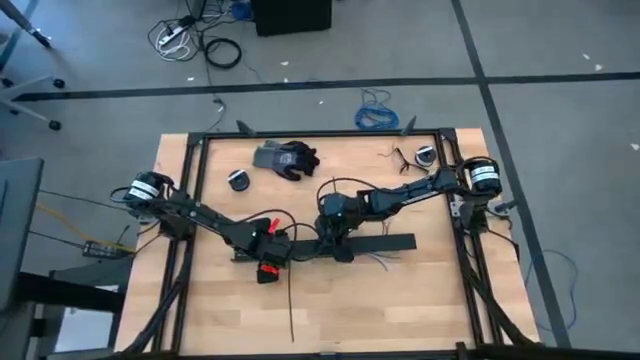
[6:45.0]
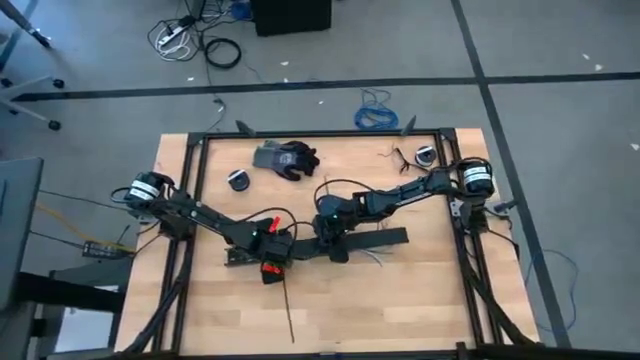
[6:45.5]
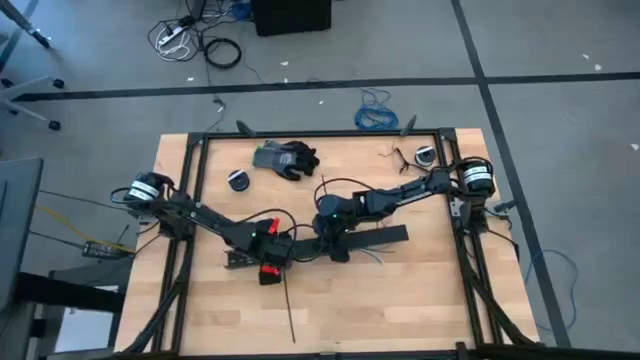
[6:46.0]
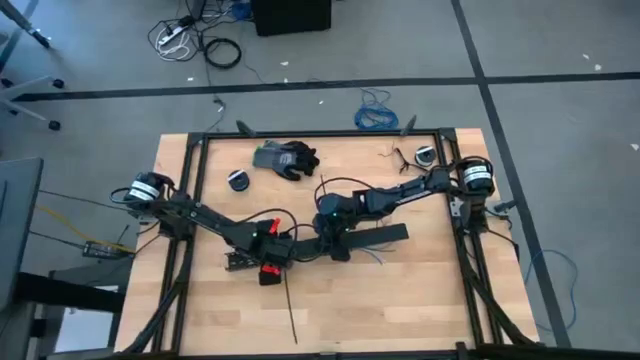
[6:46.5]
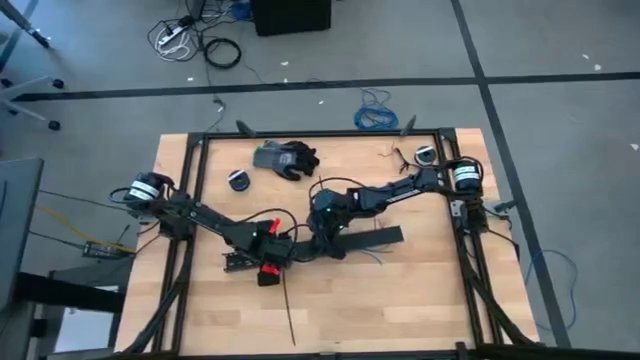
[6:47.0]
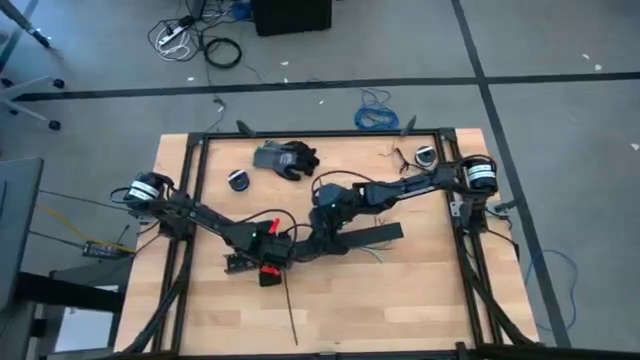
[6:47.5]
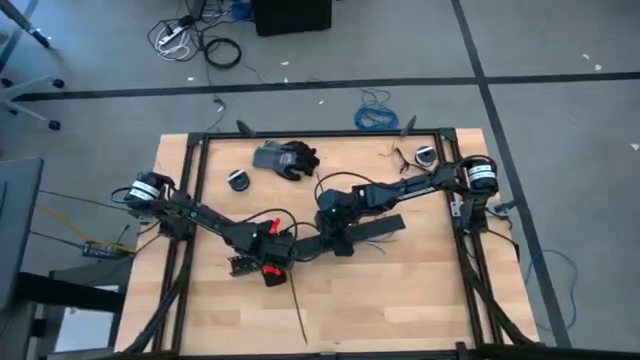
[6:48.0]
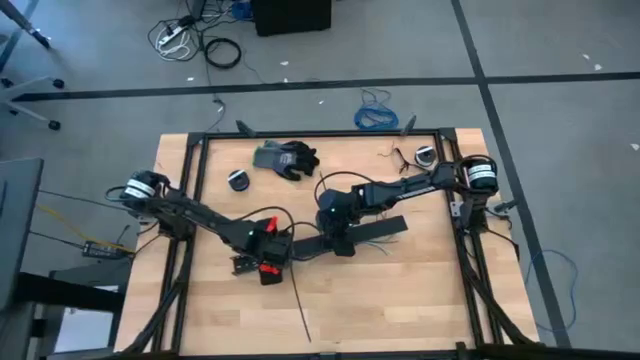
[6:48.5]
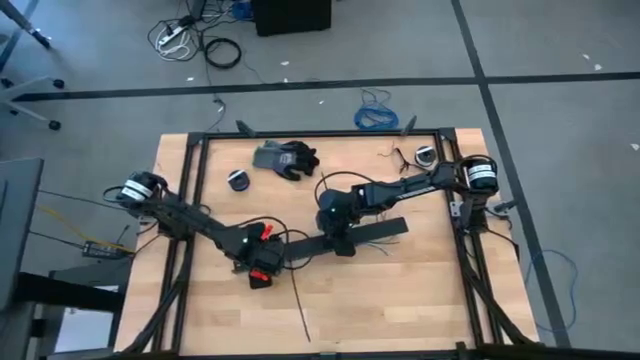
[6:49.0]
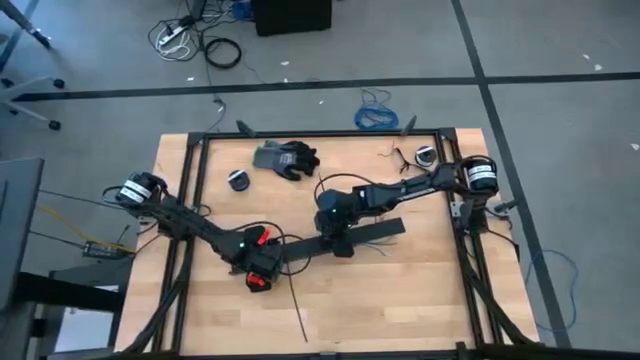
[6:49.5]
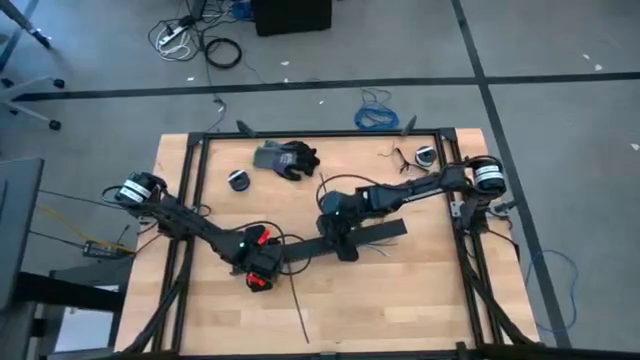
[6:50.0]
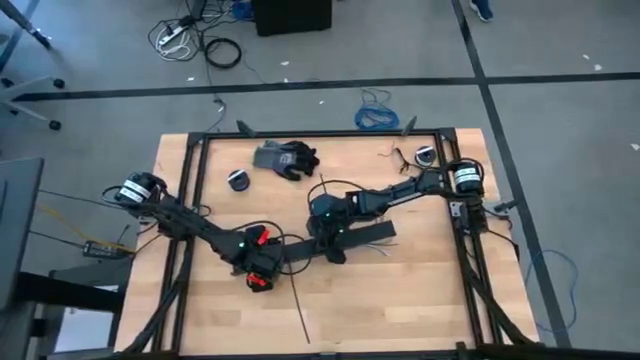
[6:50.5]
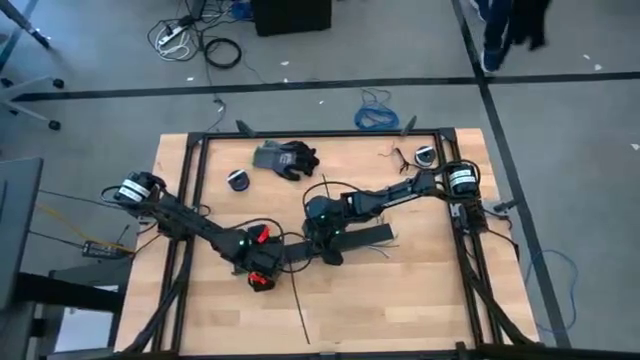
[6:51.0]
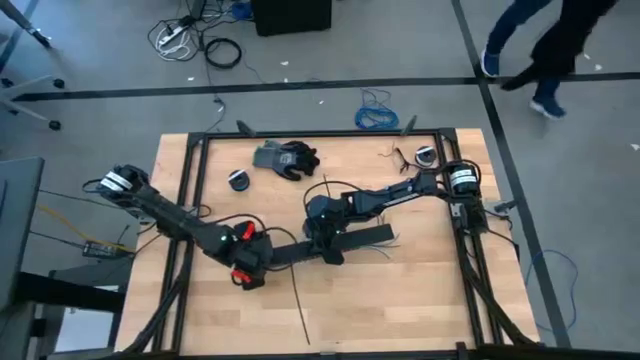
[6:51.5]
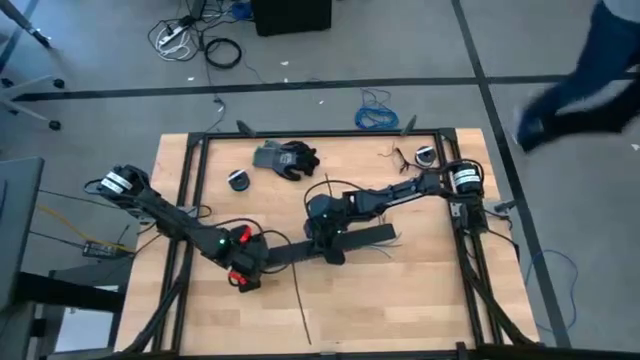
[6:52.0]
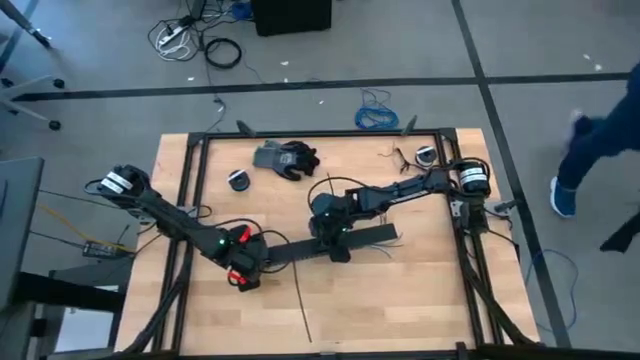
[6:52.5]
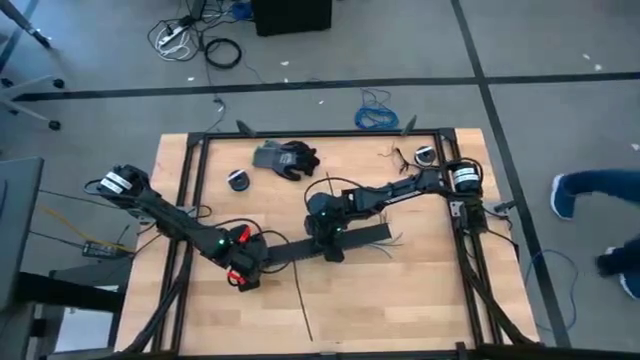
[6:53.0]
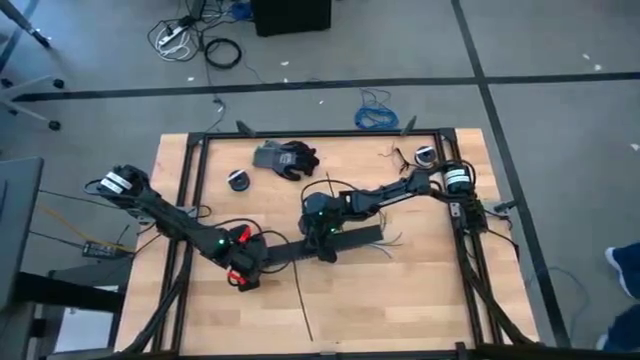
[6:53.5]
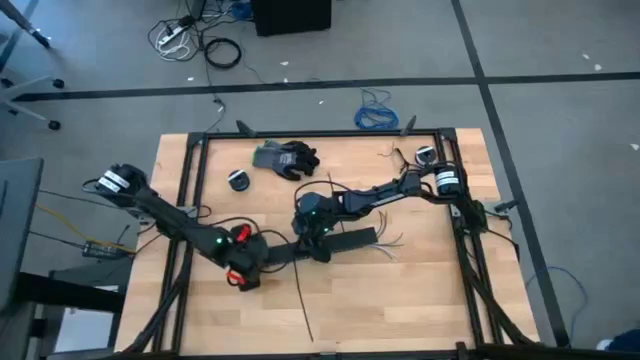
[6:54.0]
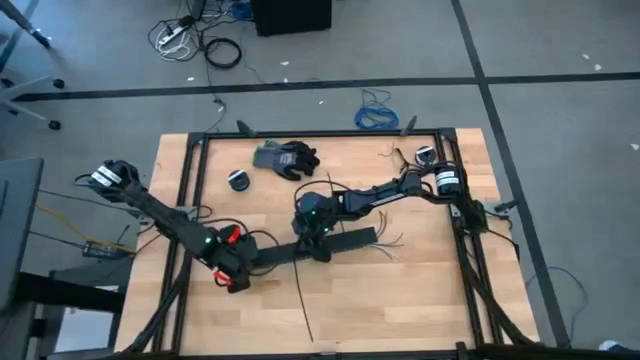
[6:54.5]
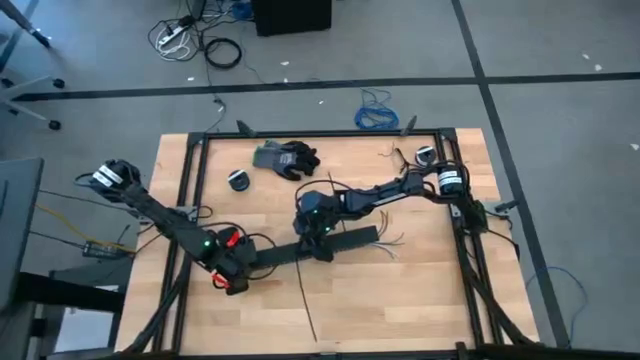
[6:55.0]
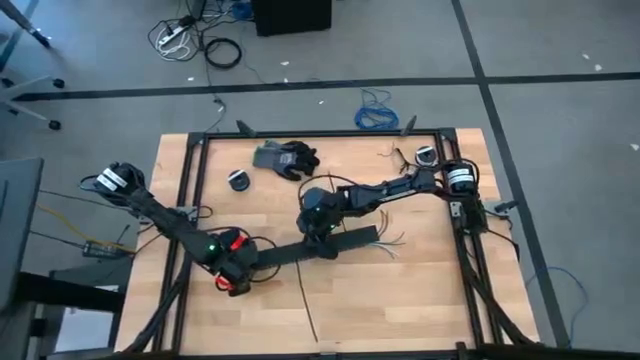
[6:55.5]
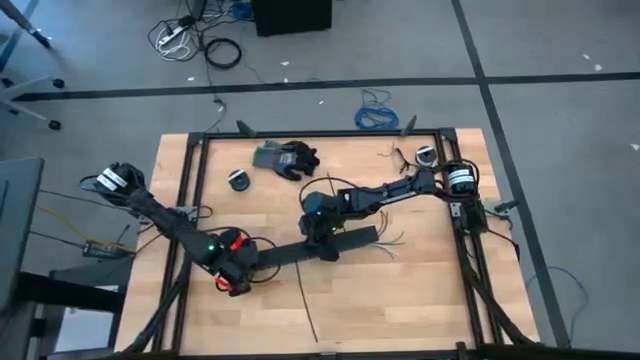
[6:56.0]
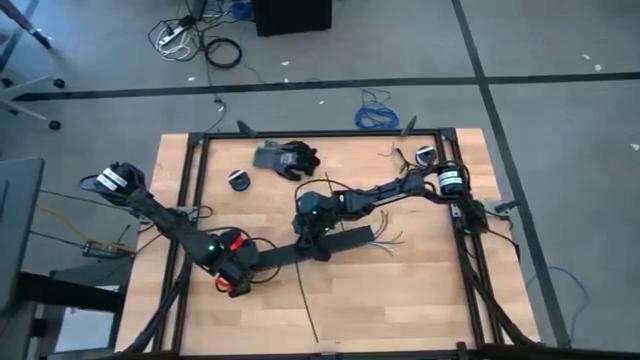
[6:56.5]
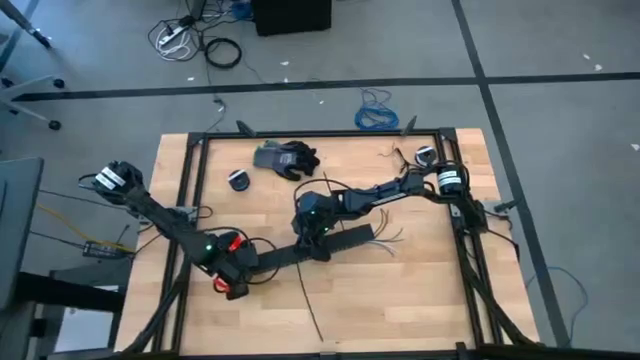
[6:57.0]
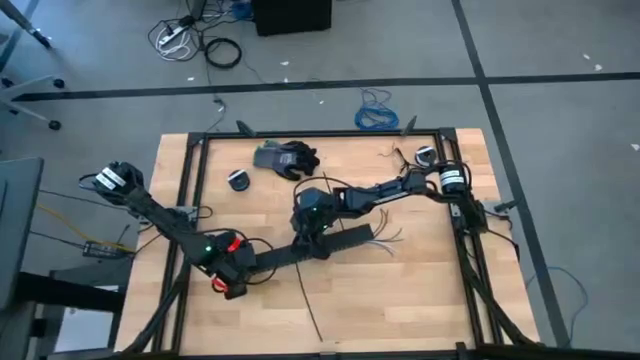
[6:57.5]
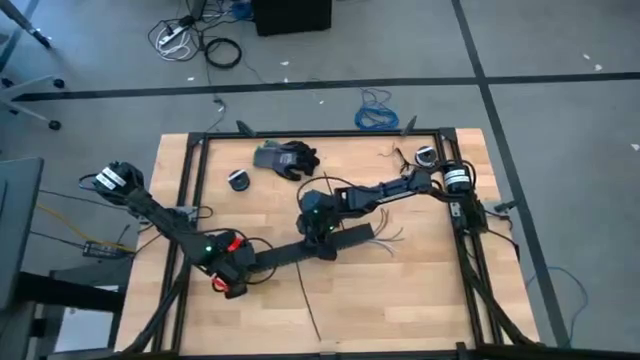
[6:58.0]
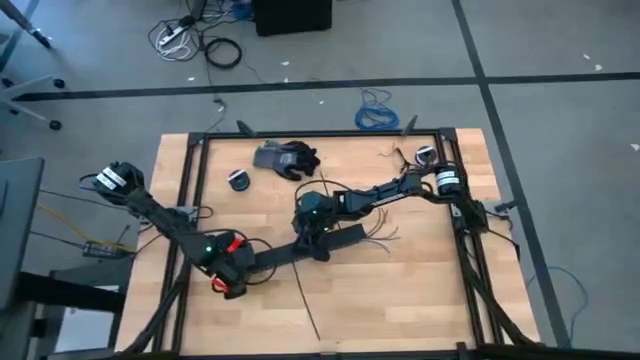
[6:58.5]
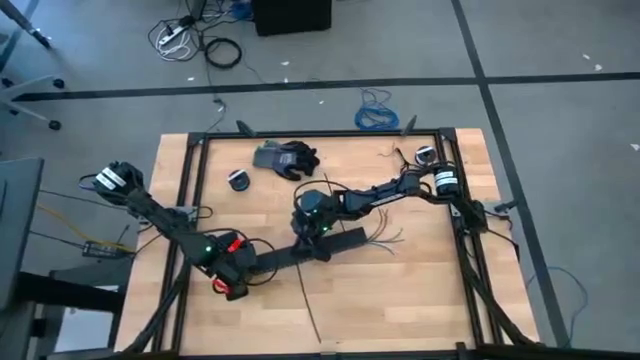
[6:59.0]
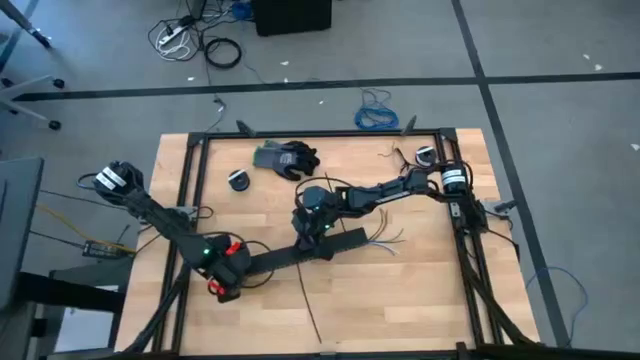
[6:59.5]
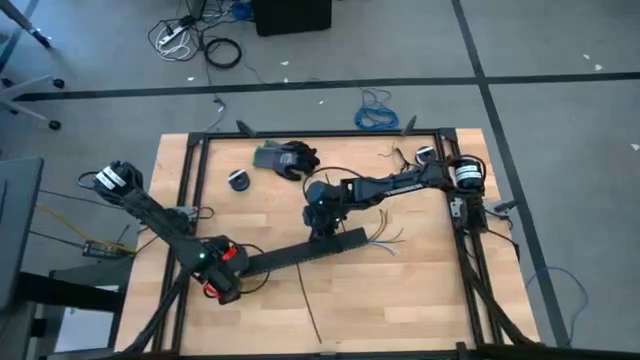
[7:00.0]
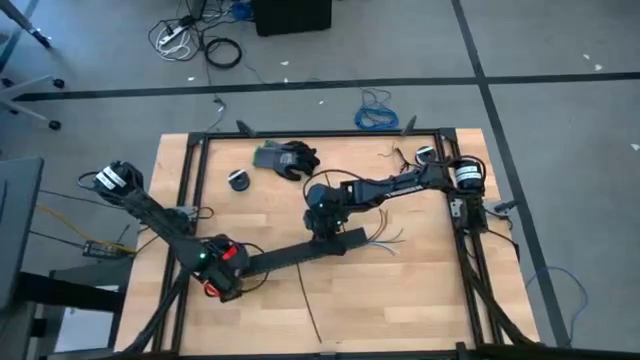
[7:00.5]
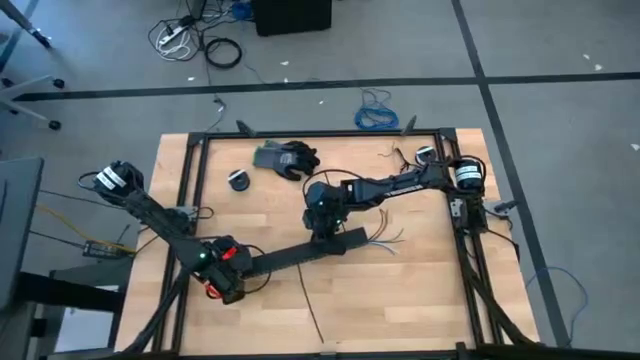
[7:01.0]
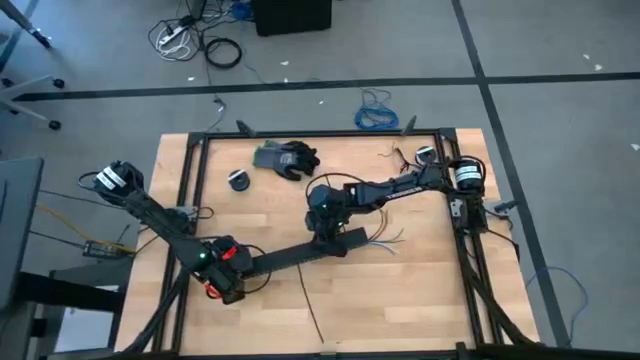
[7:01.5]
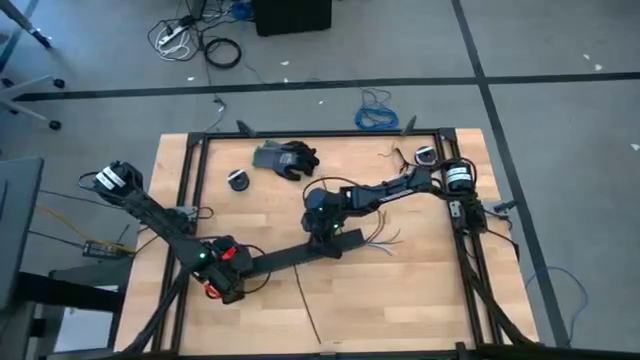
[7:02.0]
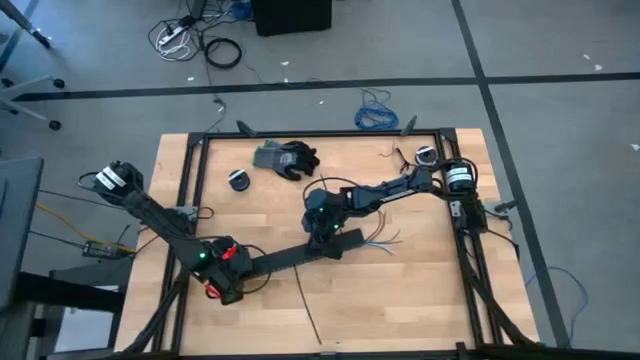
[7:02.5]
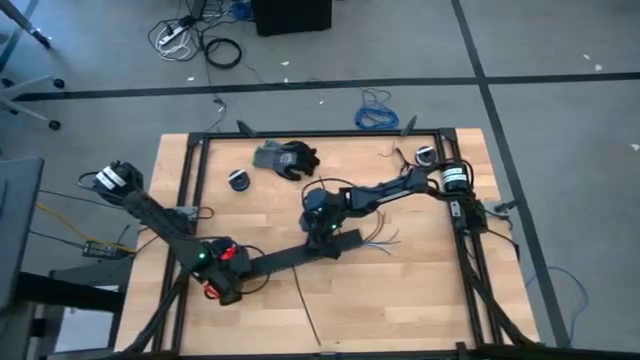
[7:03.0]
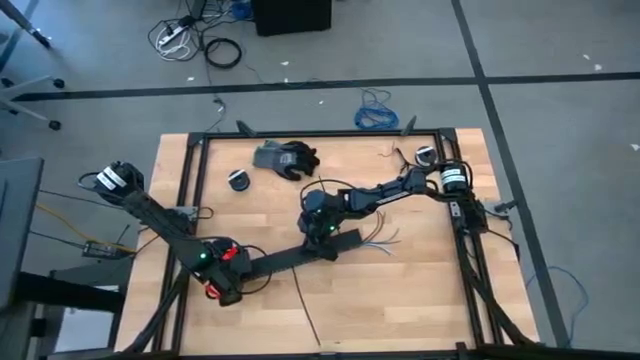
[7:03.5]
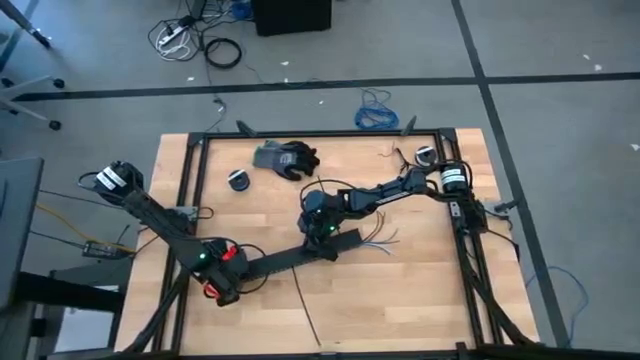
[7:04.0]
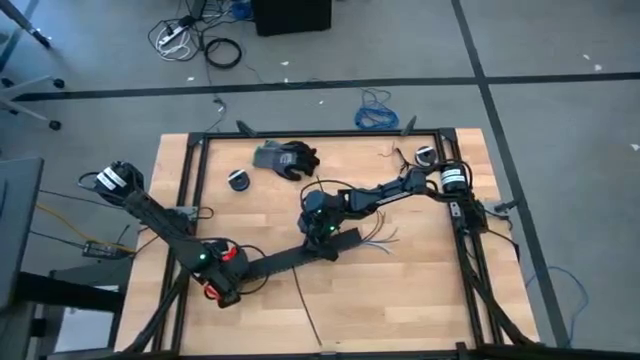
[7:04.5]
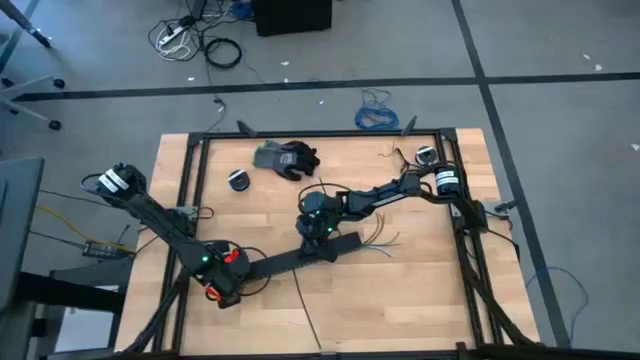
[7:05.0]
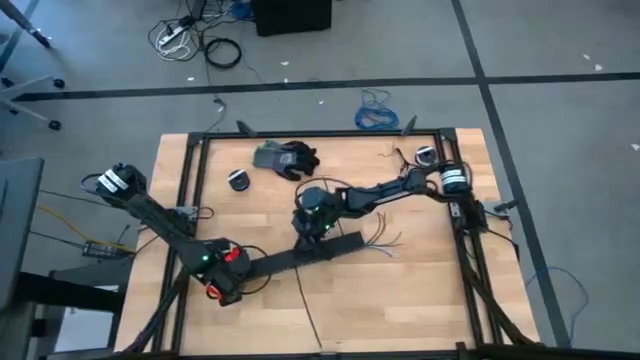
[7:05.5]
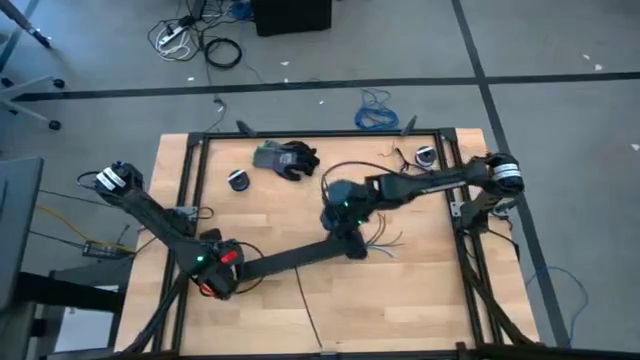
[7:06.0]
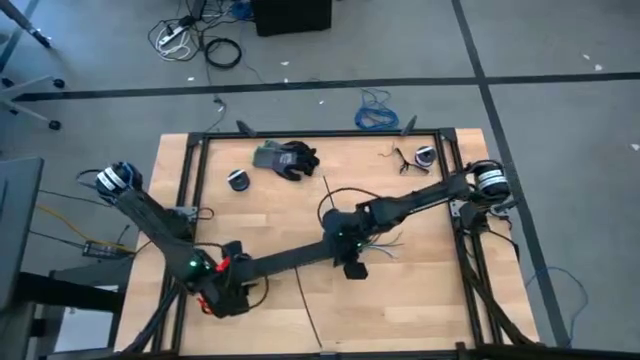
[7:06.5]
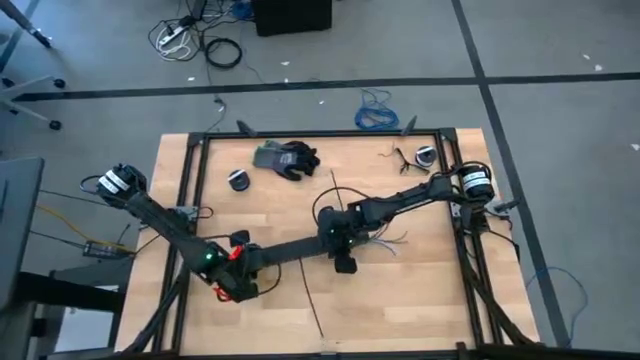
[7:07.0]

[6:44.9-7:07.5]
Task: Ziptie cables
Close the black cable duct
